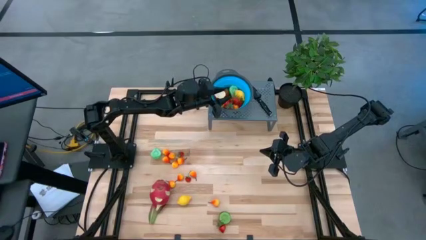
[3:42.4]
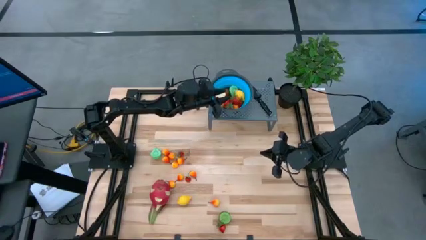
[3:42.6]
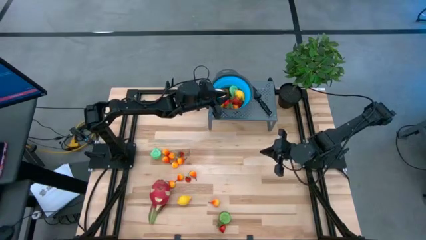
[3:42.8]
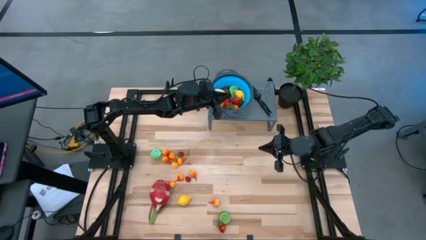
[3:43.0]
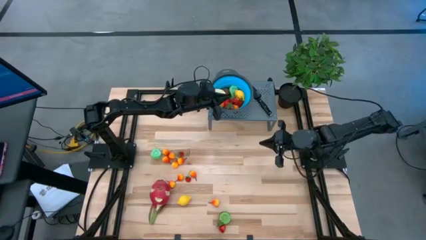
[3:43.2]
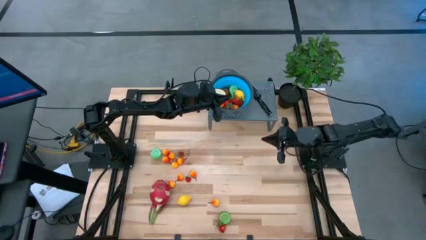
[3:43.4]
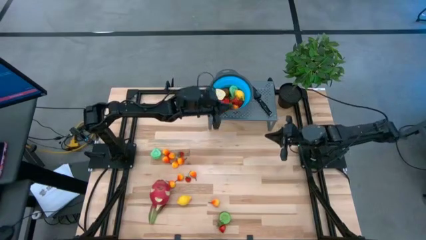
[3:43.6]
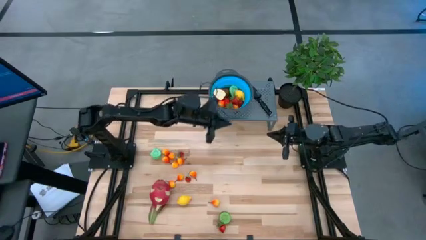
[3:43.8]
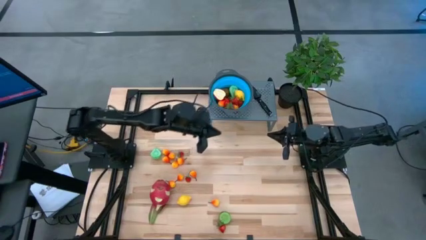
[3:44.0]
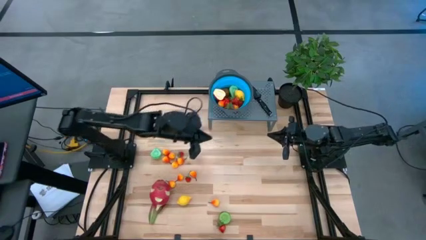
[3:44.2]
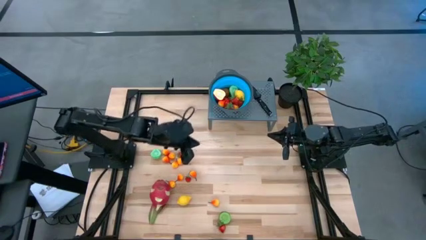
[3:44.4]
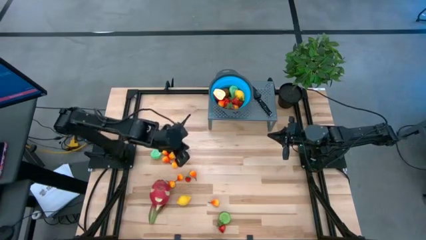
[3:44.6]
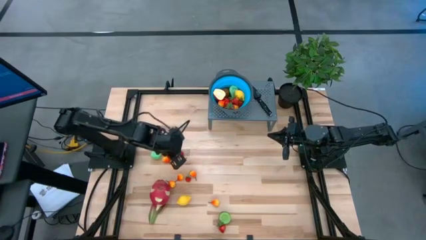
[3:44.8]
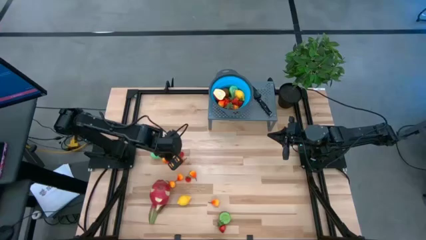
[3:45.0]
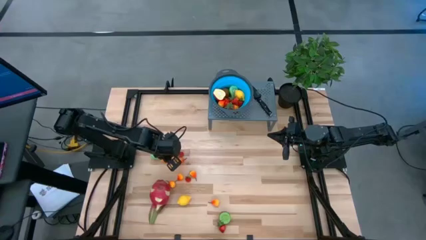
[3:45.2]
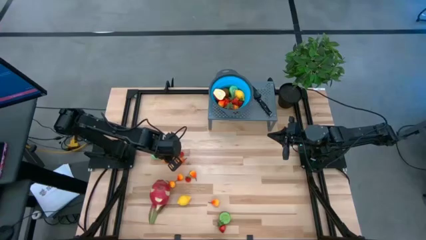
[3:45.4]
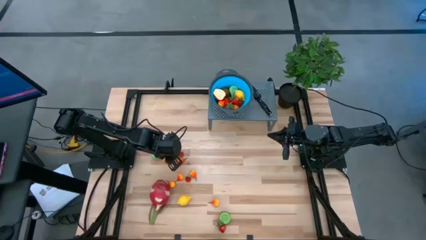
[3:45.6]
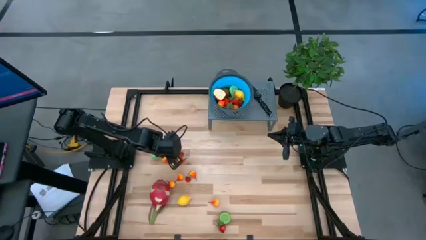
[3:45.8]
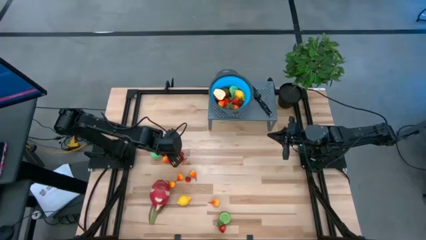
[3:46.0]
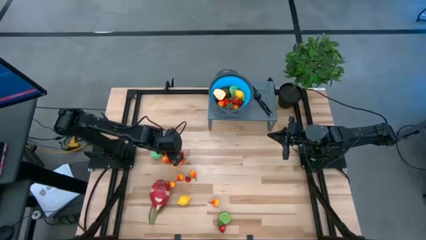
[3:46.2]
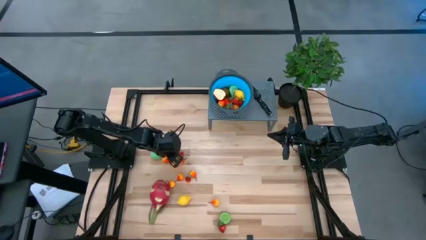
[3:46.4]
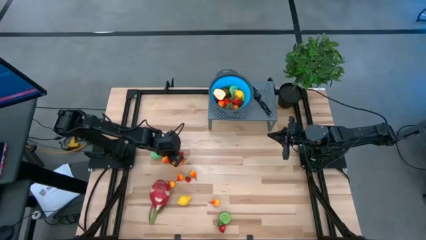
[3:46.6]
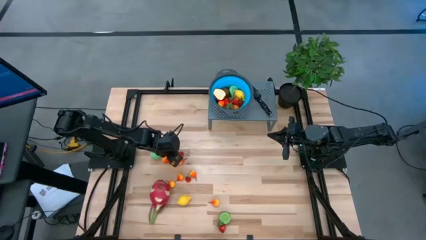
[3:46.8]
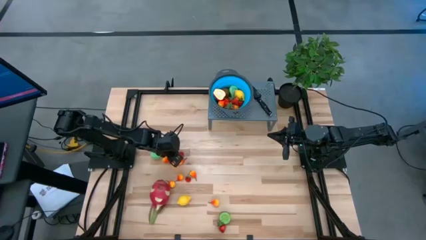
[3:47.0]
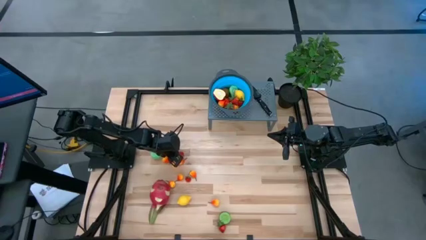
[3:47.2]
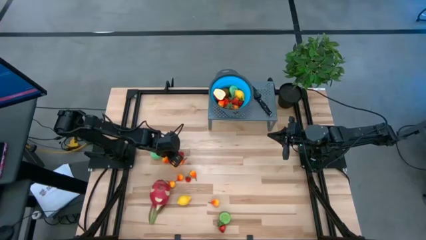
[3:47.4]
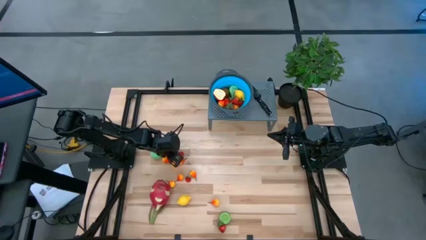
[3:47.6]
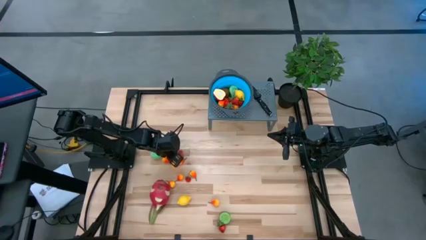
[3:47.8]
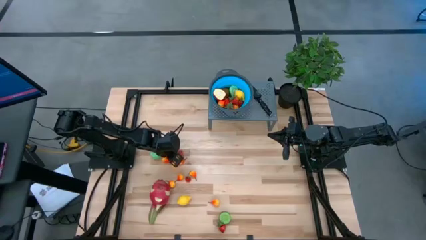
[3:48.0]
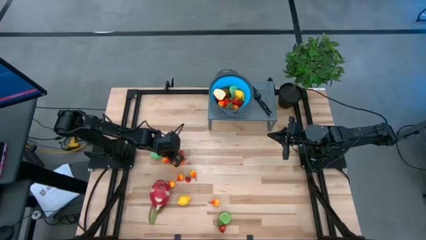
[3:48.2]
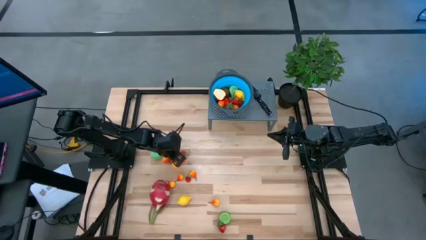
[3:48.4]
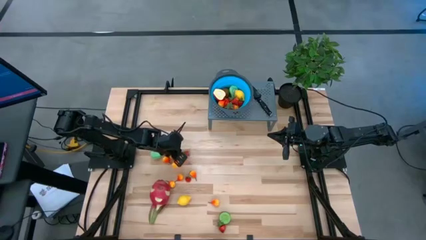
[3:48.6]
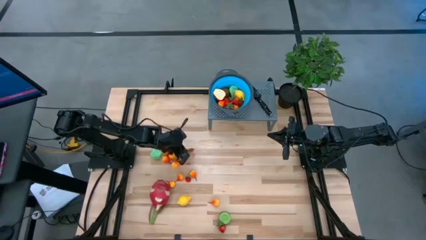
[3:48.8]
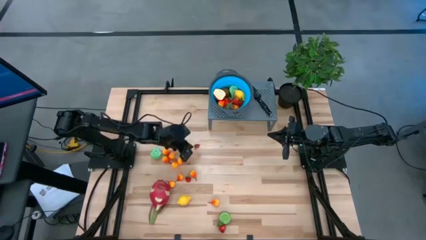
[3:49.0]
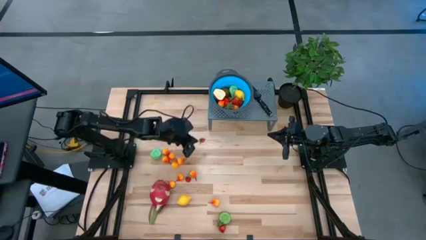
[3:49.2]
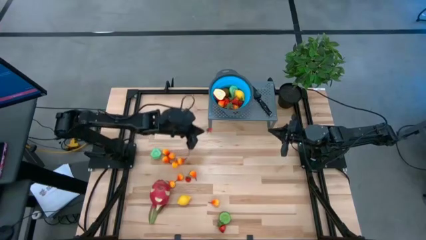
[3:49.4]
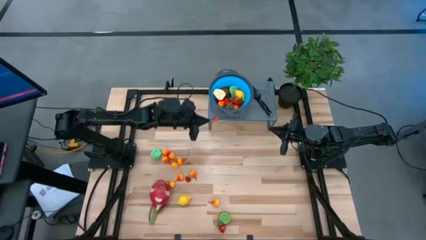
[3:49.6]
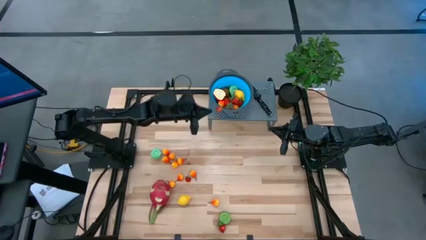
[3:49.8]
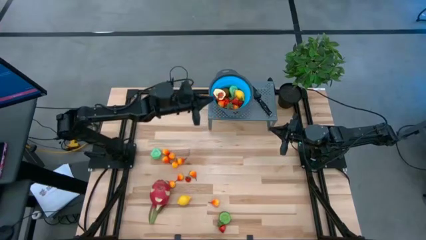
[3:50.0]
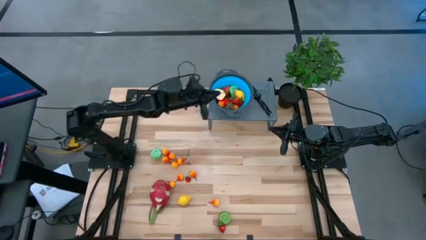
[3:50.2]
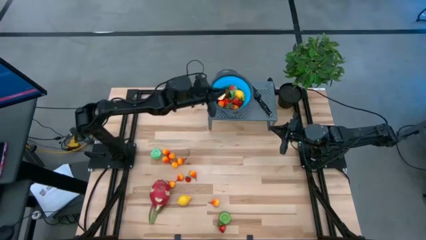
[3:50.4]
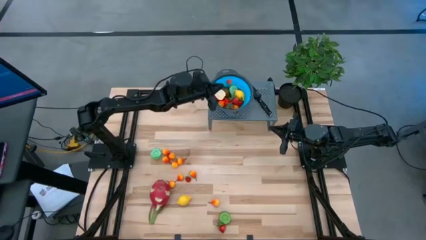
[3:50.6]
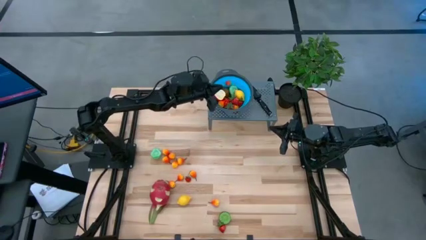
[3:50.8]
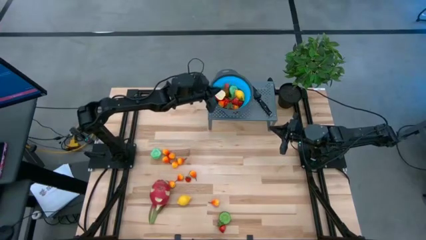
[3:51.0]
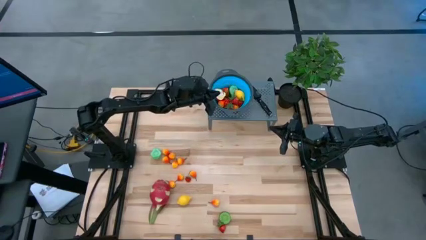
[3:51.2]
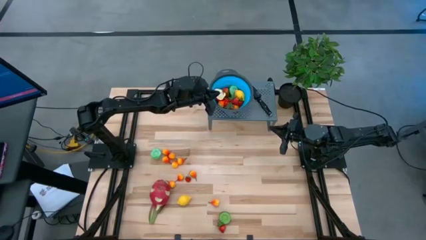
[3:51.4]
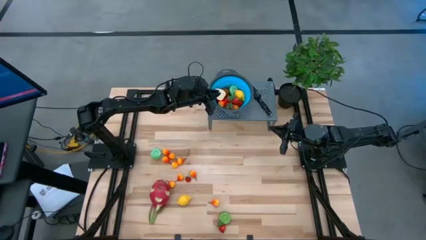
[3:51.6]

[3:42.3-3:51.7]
Task: Pick & Place Fruit
Put the top strawberry into the strainer bowl

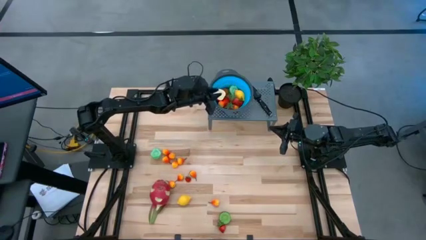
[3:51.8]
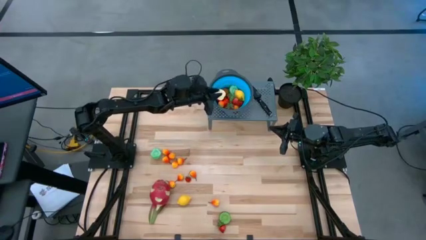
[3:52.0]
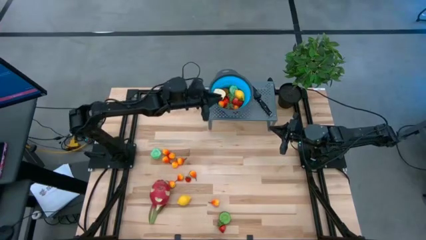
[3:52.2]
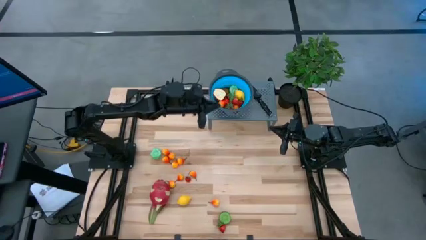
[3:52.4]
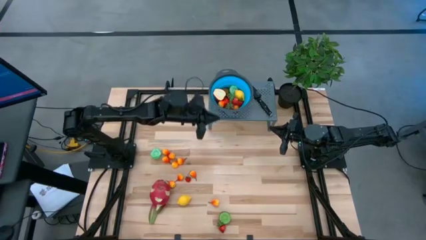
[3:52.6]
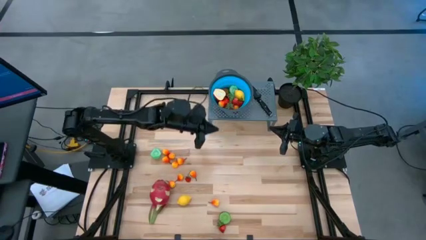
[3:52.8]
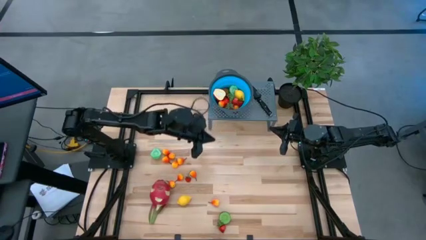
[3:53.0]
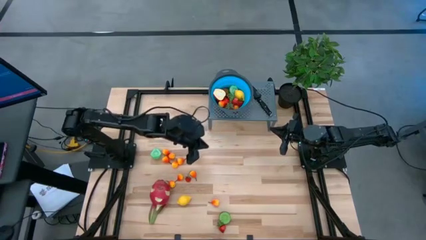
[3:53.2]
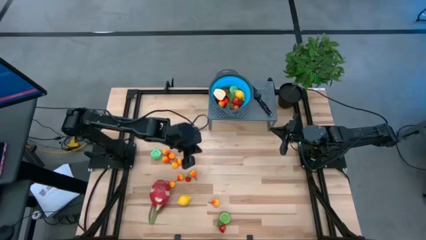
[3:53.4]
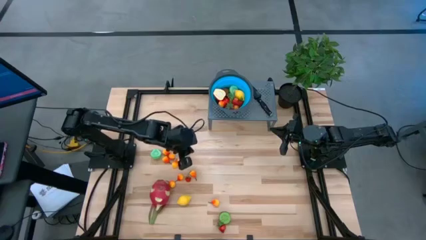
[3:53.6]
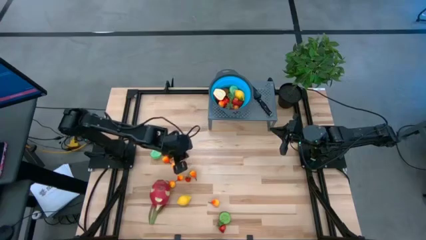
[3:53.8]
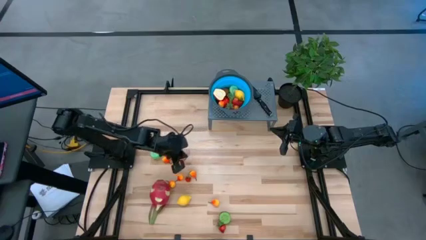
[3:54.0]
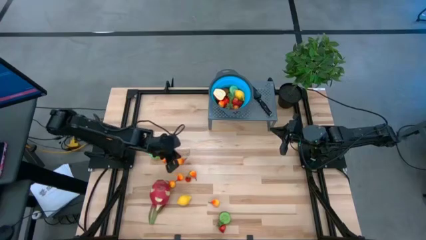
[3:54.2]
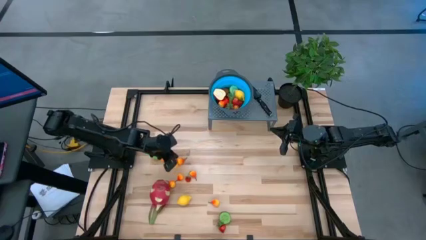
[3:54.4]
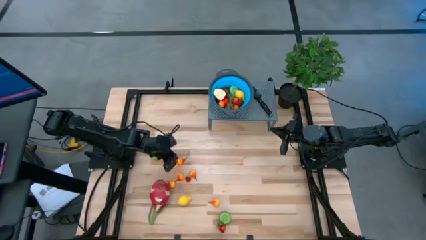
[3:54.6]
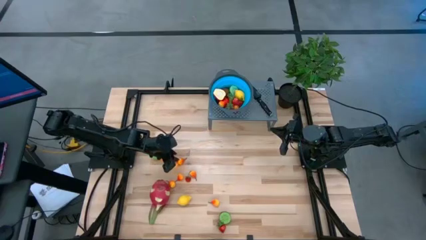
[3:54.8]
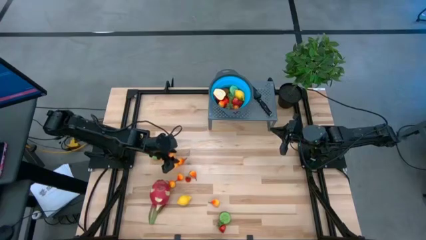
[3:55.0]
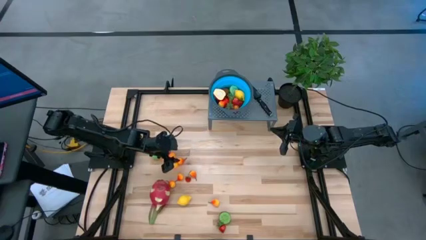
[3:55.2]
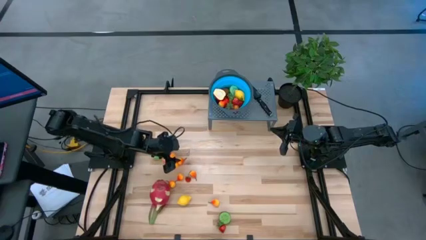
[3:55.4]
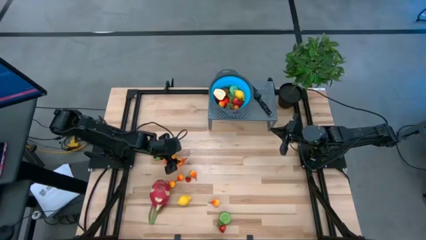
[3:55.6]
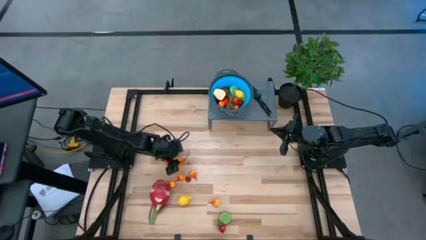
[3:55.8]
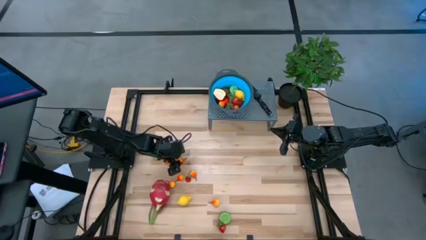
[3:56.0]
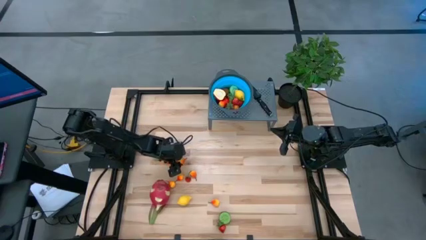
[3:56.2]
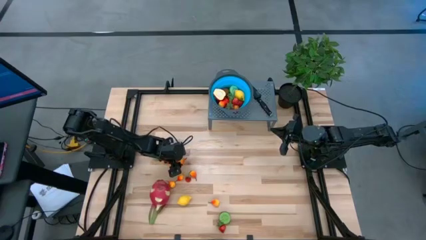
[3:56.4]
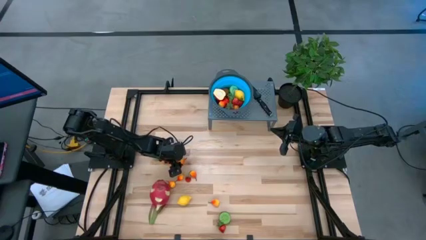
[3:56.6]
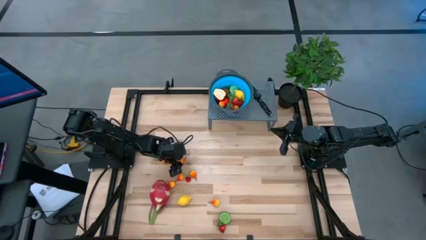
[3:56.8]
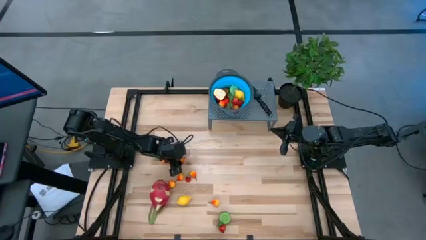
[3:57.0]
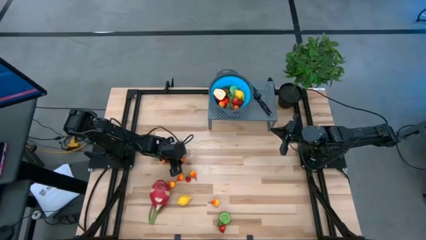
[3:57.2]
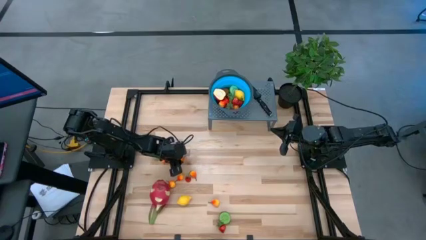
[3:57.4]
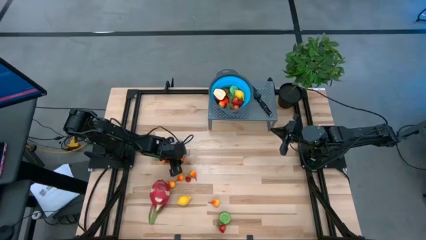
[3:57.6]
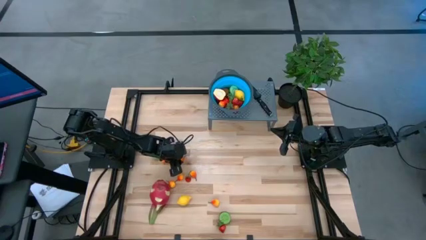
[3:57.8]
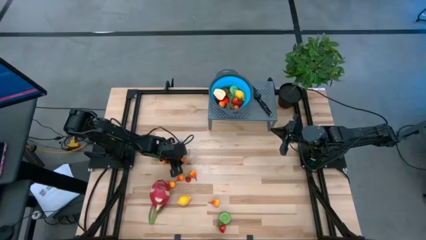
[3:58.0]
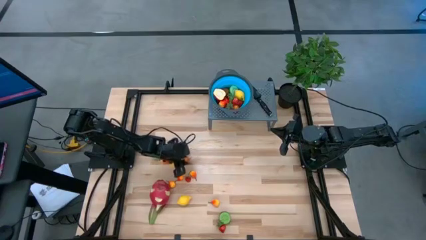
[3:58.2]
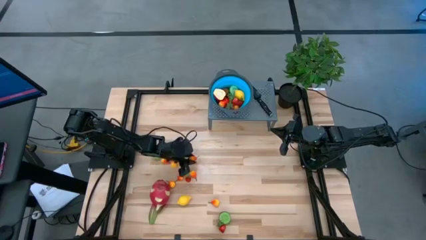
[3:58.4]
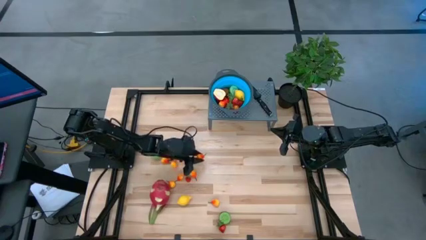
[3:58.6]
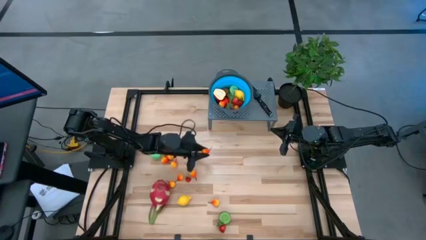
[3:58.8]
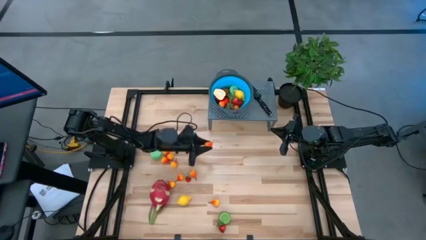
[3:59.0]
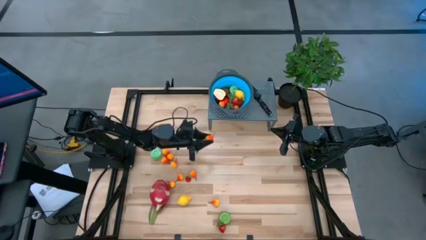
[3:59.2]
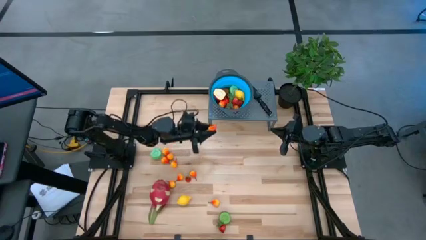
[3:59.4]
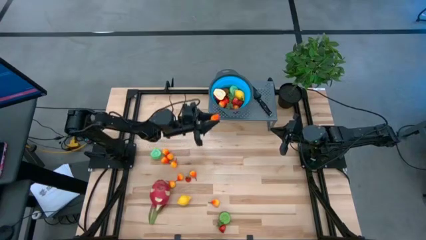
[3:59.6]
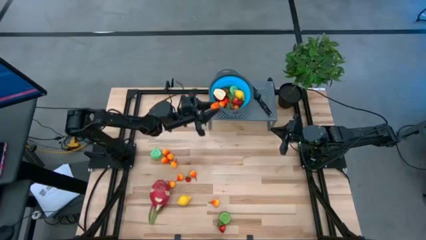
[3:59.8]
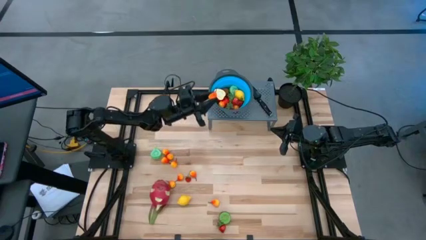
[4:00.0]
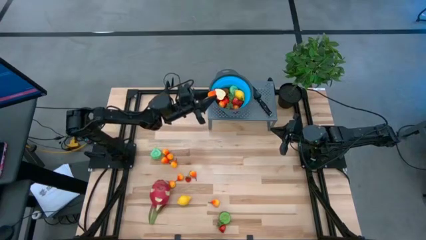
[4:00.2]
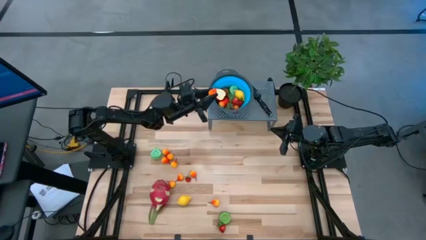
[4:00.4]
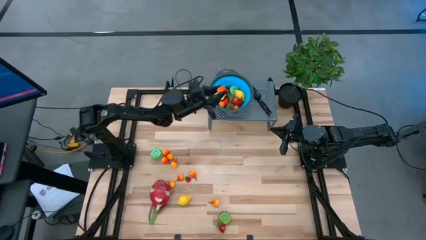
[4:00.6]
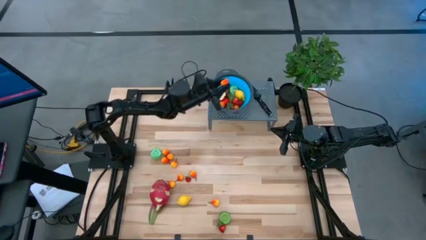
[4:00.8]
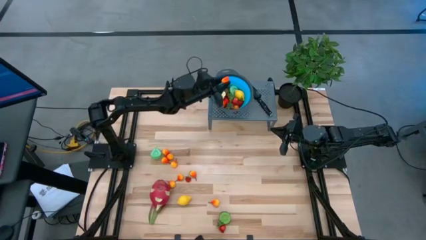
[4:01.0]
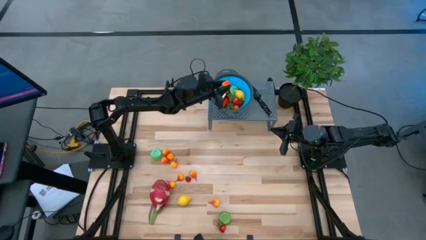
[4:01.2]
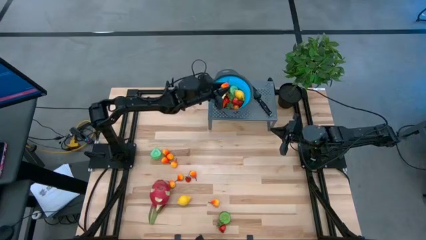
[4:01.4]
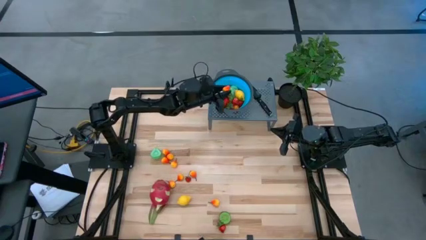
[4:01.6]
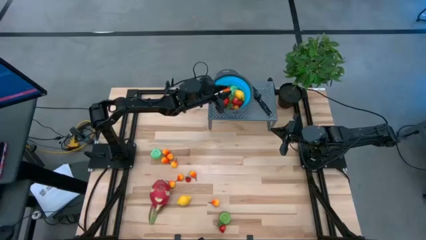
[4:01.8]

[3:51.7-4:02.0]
Put the yellow pear into the strainer bowl
